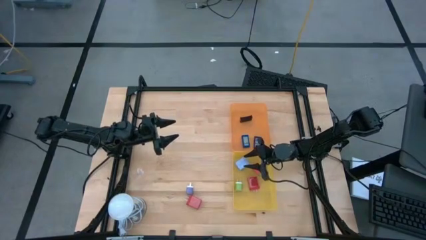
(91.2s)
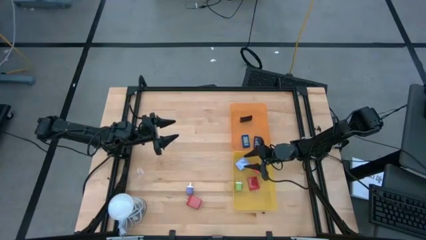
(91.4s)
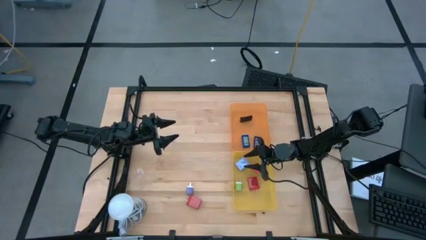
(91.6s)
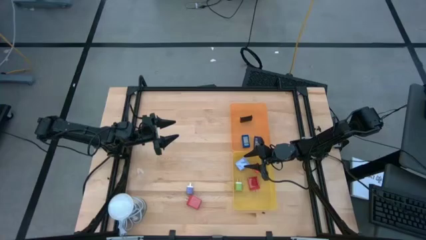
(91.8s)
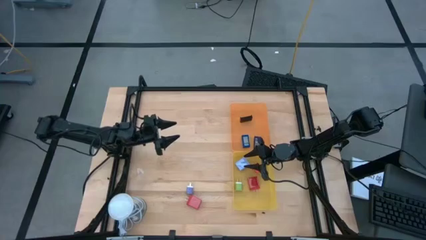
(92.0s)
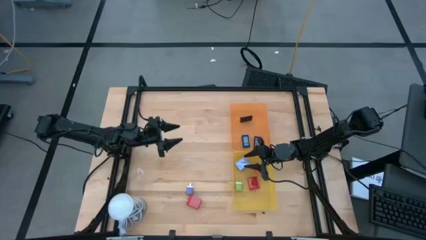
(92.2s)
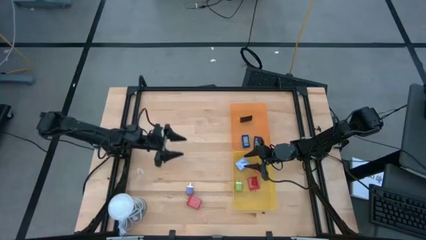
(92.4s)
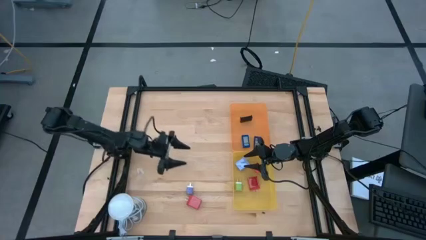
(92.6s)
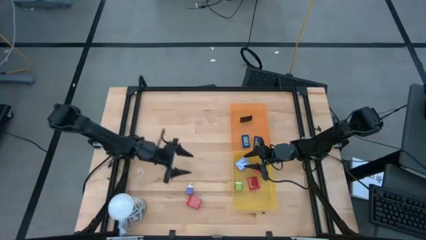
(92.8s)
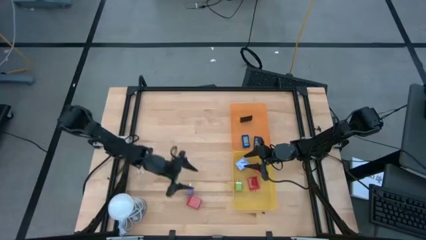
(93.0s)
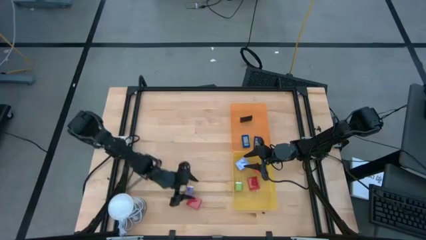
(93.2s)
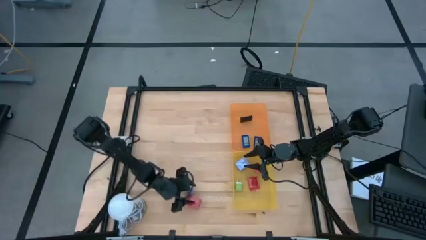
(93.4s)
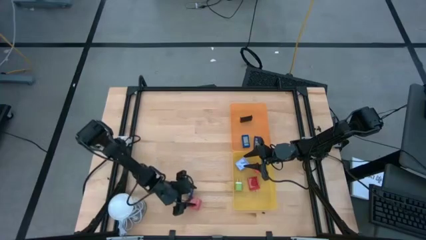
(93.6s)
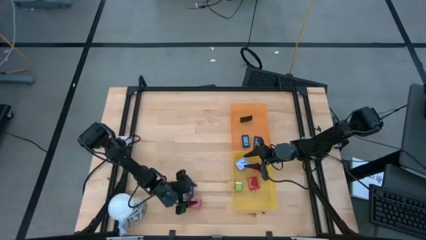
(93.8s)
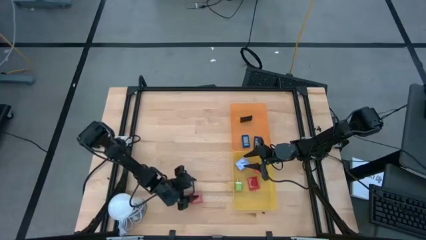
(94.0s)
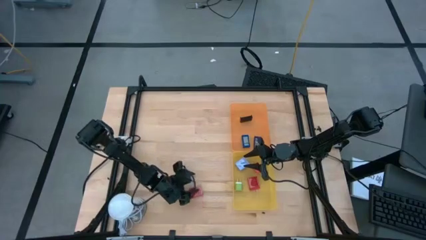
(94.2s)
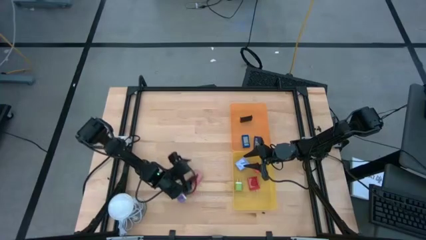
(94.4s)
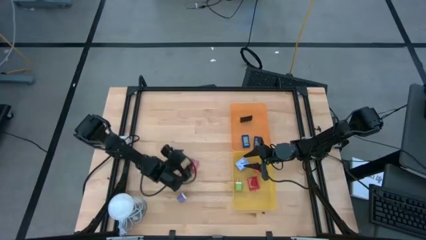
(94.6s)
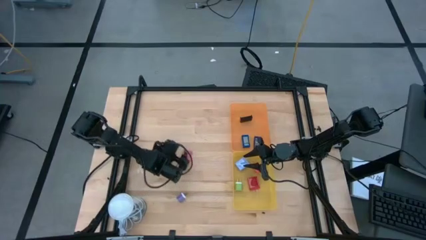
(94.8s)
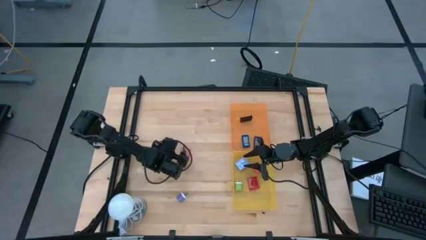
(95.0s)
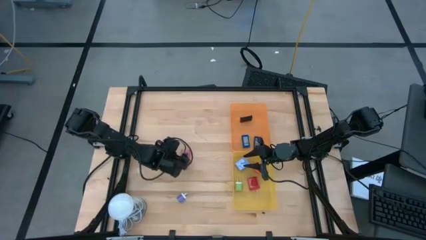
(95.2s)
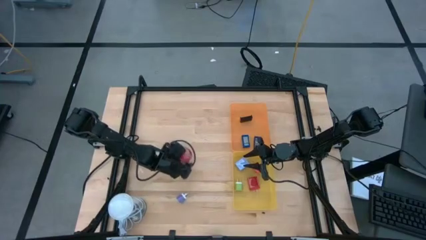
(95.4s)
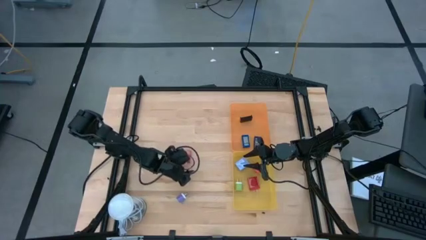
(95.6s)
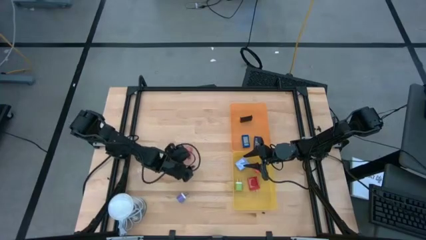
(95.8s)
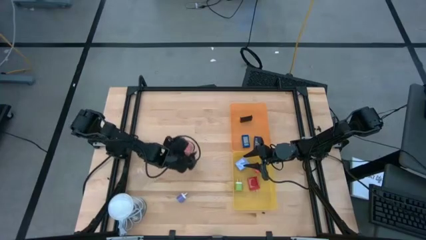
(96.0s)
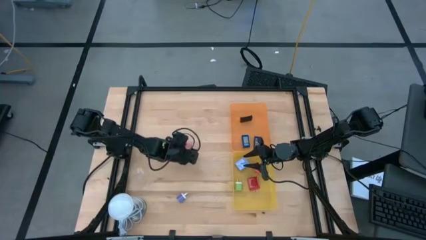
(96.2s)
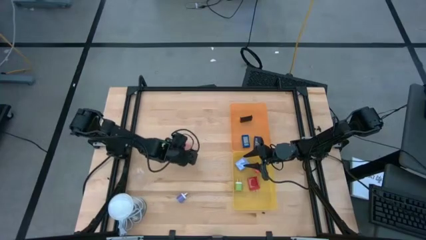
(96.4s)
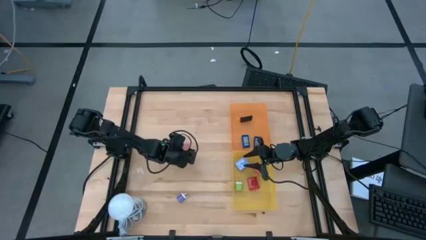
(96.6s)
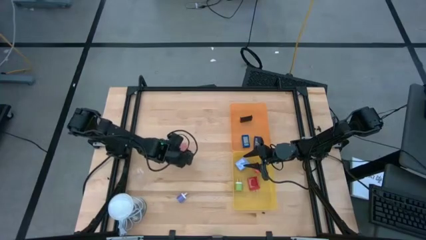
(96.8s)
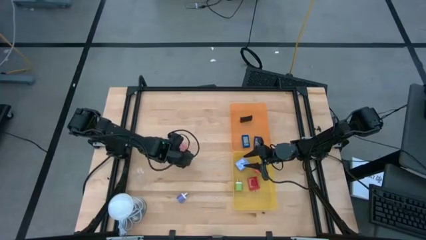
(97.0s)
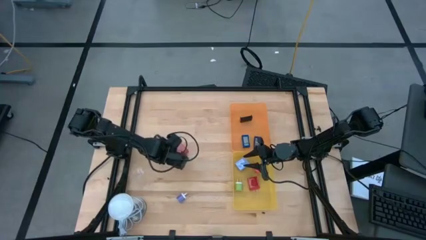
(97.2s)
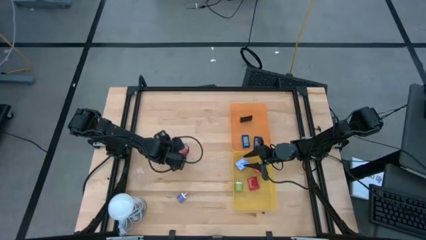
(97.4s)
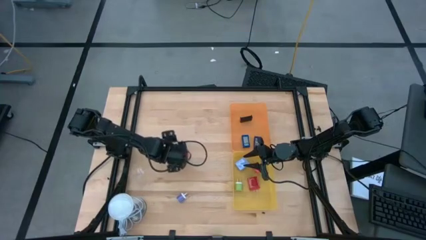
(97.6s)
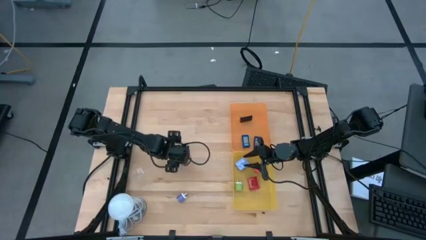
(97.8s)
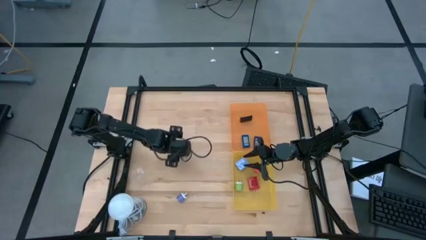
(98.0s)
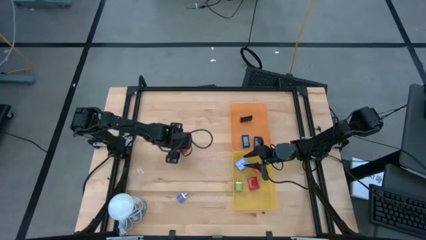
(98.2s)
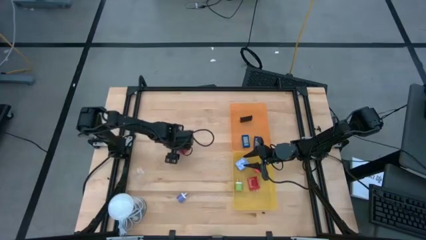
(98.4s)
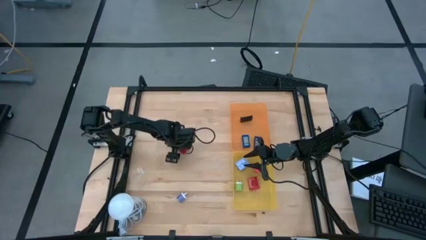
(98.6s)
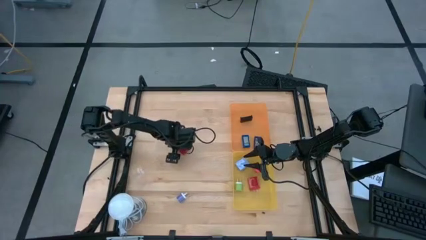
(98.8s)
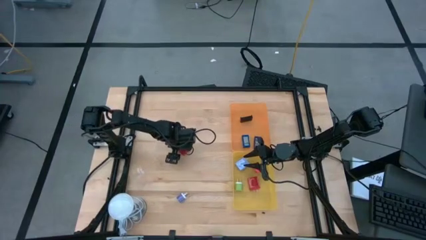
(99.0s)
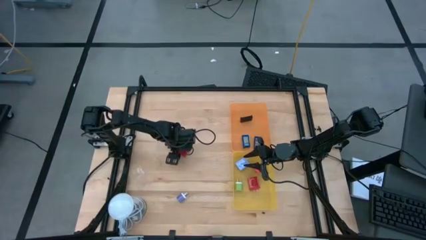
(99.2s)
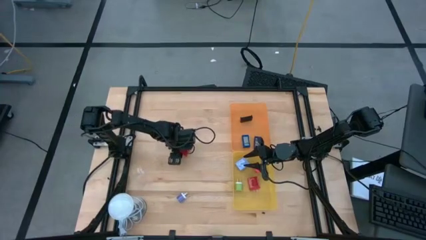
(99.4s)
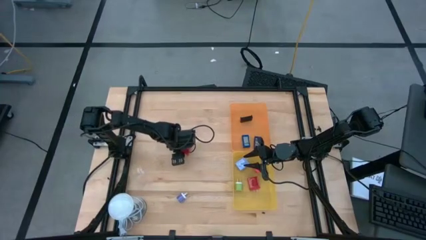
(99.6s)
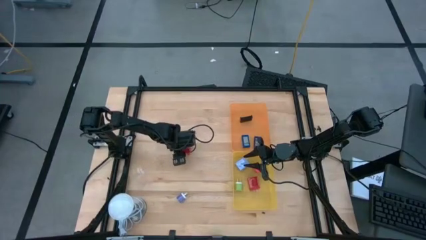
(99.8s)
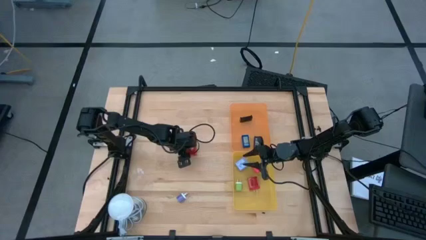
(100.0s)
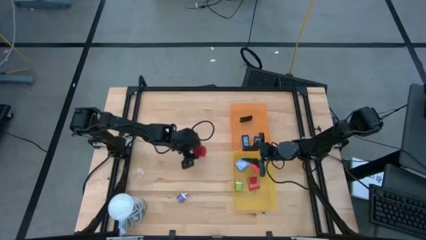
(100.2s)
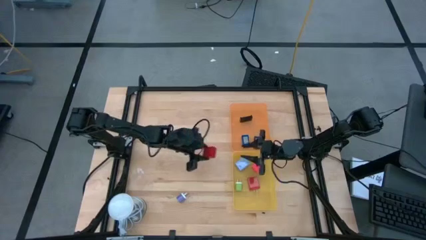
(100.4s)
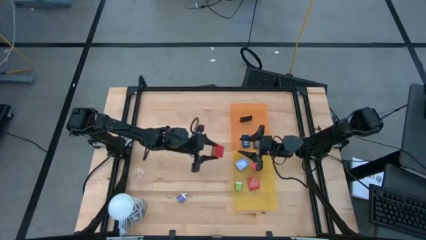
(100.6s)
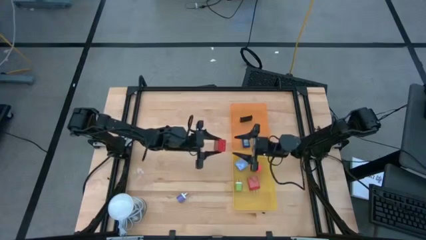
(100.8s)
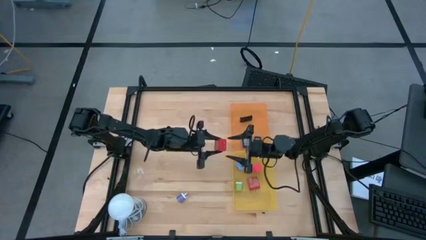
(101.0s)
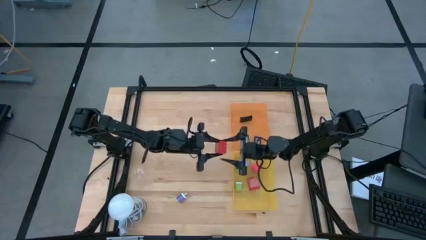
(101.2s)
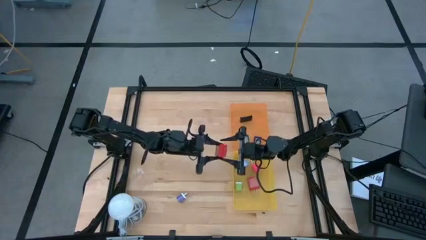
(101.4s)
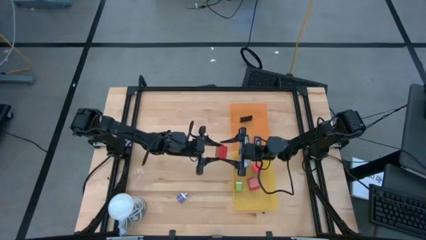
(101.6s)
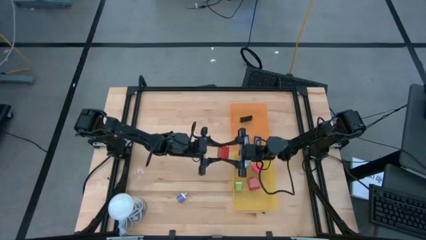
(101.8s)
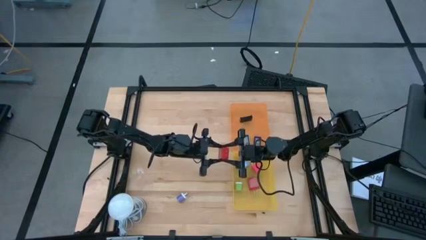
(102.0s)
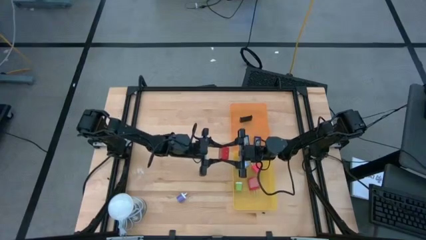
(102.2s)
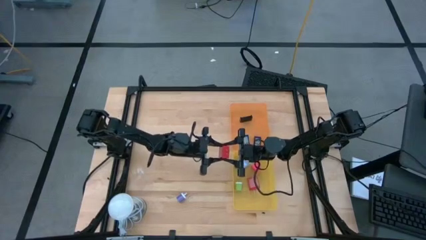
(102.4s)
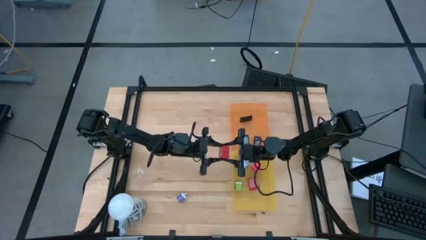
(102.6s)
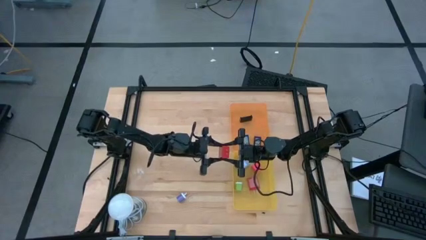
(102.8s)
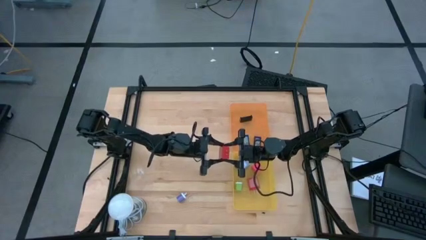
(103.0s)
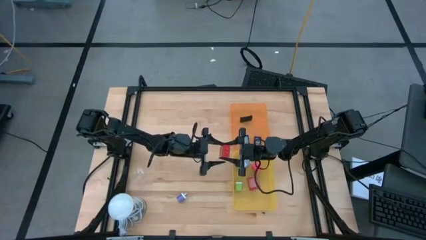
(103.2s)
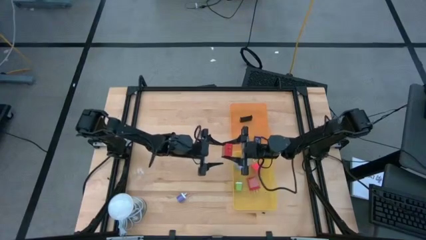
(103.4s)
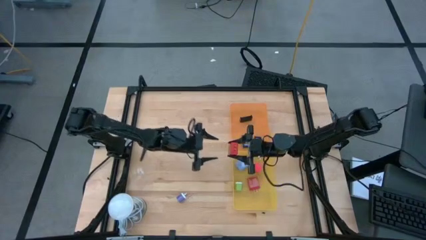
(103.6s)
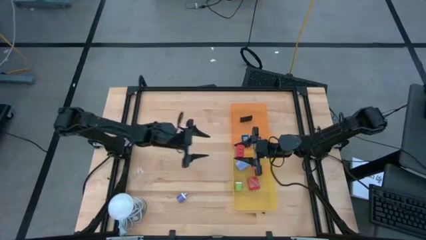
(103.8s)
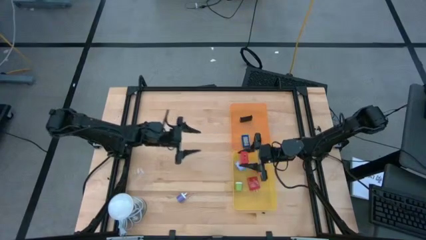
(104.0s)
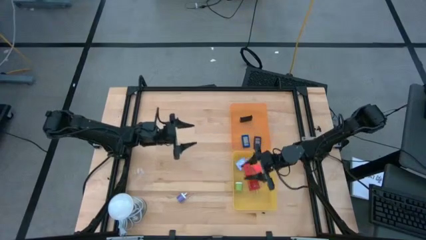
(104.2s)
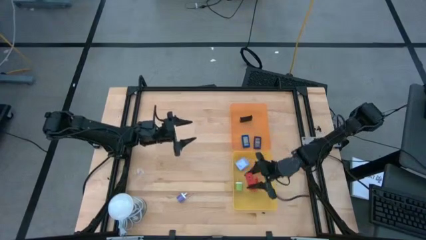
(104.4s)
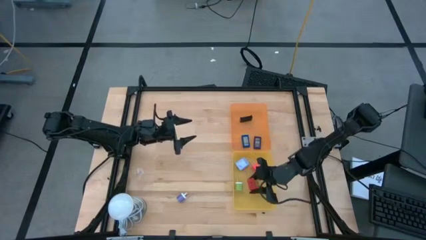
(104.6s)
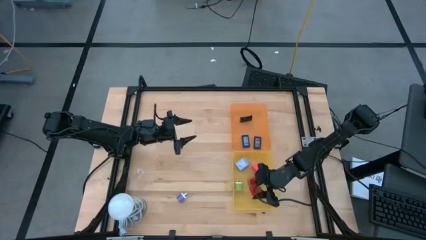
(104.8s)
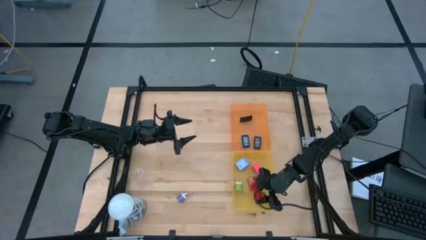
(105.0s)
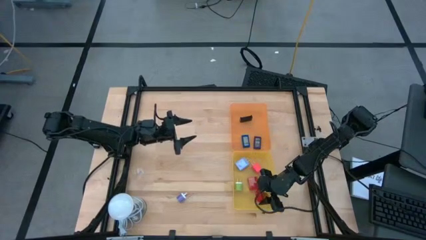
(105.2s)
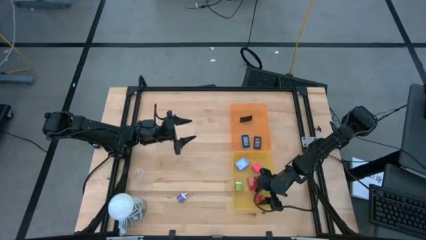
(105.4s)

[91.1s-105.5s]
Task: Pick & Place Office items
Put the red charger adapter into the yellow bin
